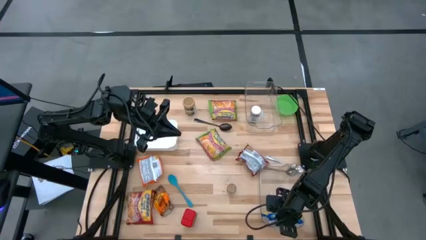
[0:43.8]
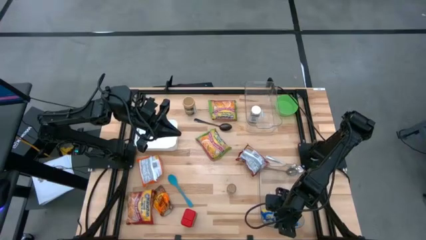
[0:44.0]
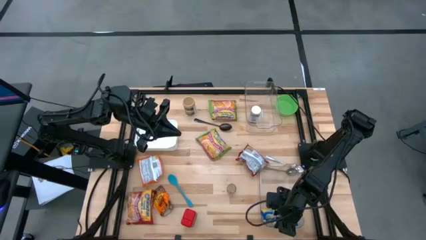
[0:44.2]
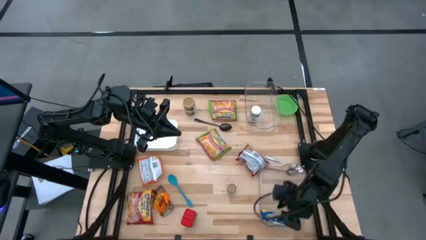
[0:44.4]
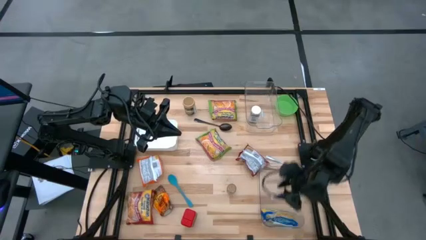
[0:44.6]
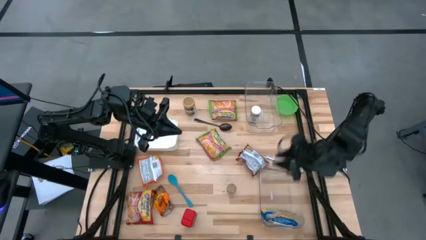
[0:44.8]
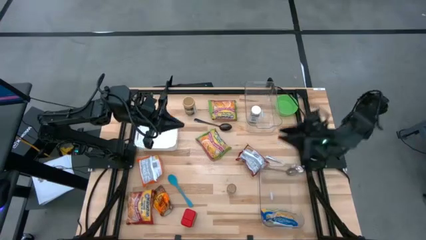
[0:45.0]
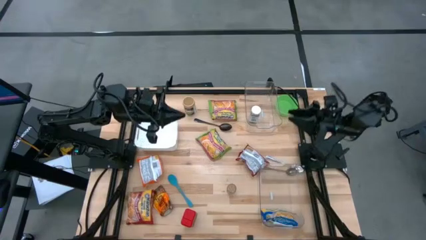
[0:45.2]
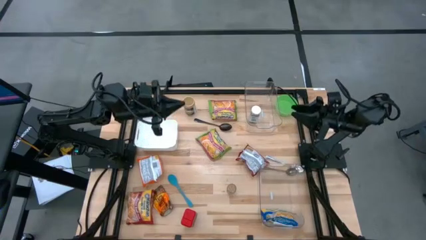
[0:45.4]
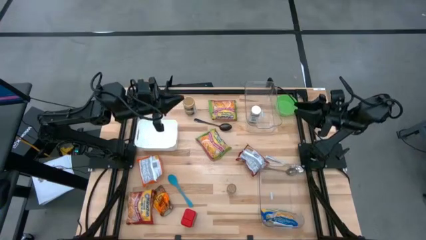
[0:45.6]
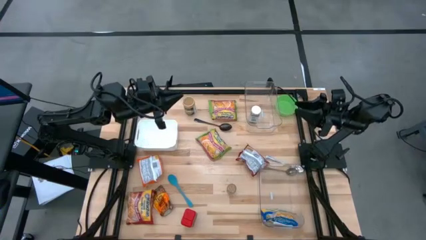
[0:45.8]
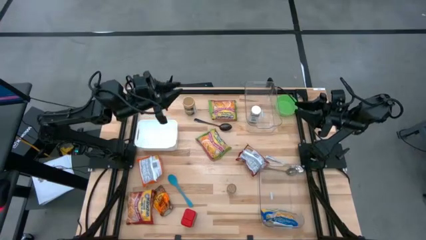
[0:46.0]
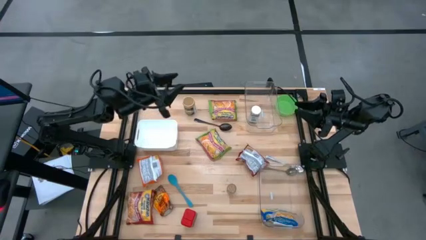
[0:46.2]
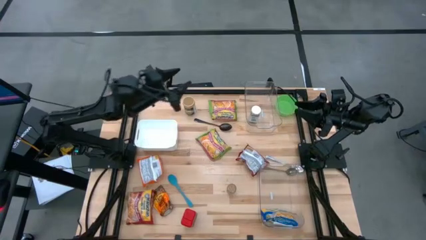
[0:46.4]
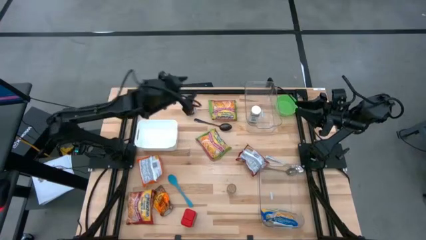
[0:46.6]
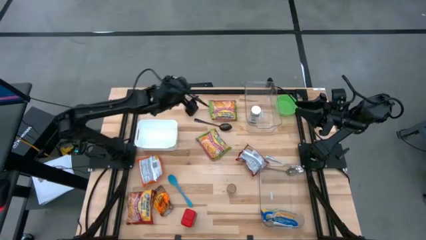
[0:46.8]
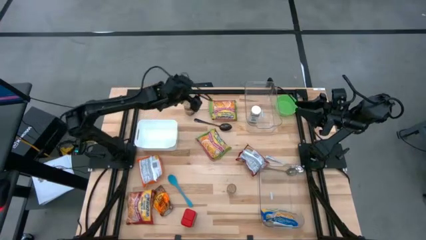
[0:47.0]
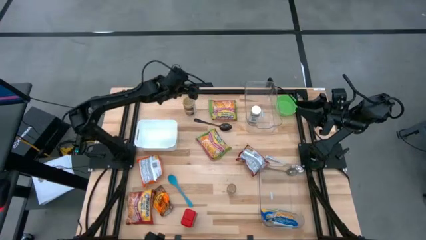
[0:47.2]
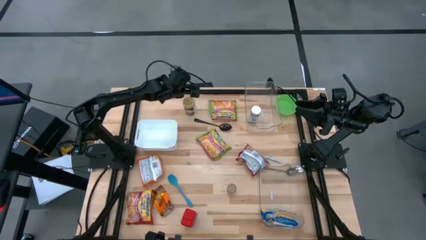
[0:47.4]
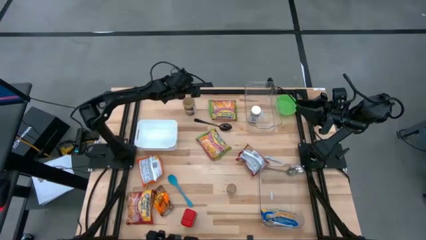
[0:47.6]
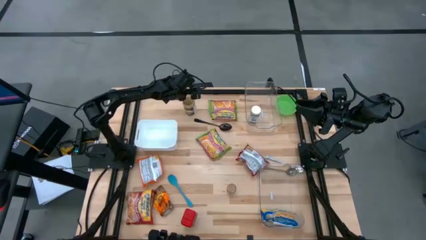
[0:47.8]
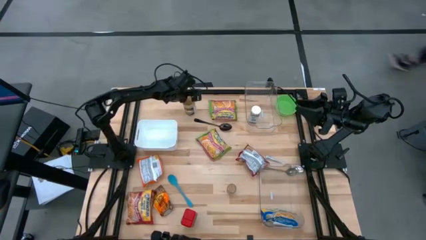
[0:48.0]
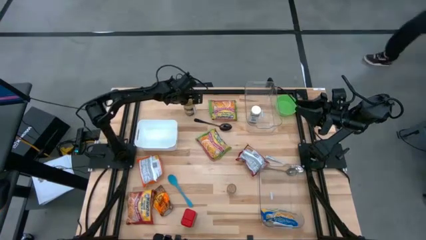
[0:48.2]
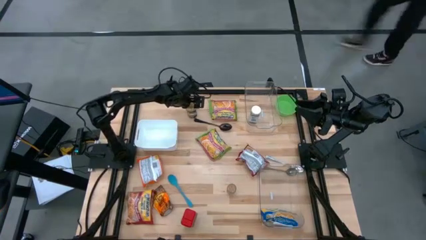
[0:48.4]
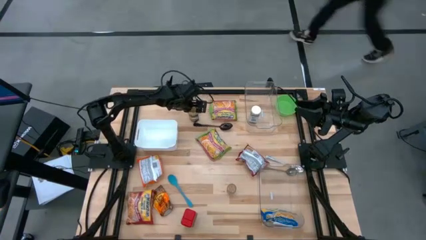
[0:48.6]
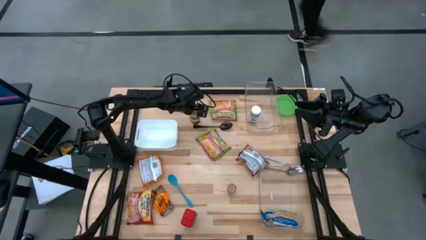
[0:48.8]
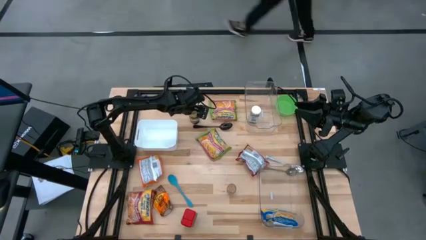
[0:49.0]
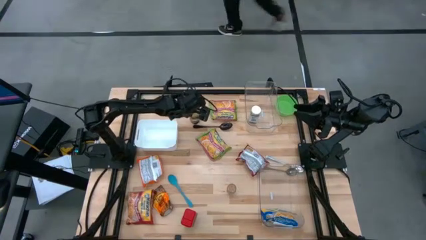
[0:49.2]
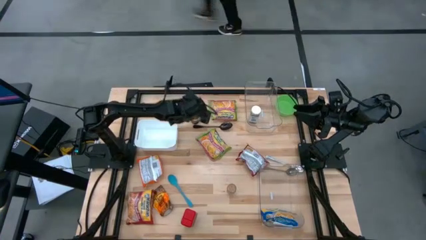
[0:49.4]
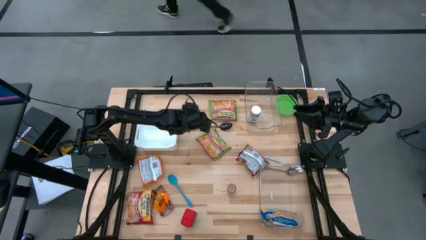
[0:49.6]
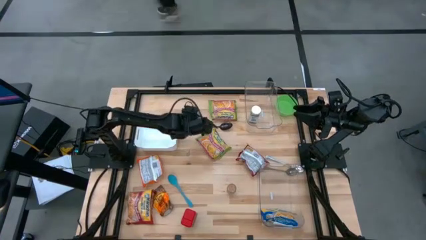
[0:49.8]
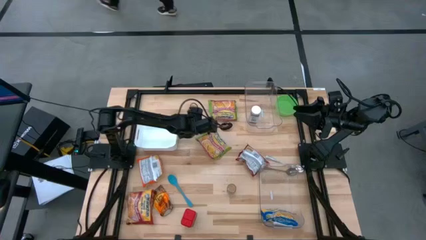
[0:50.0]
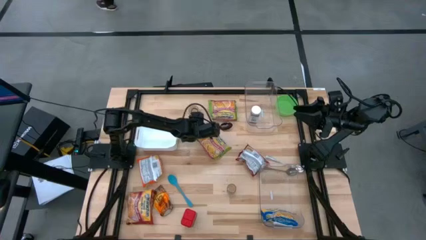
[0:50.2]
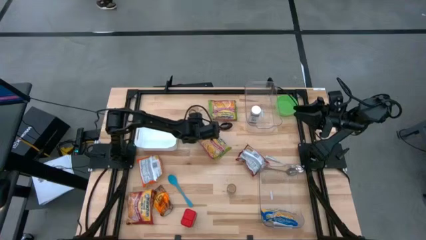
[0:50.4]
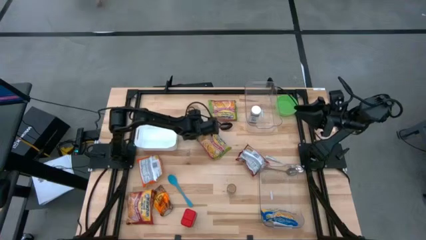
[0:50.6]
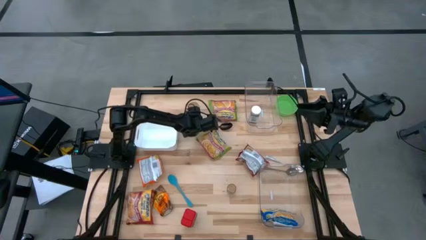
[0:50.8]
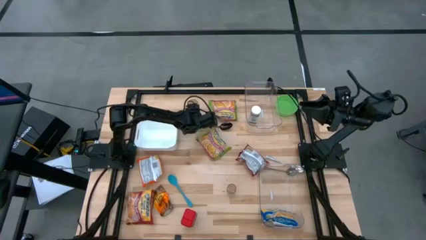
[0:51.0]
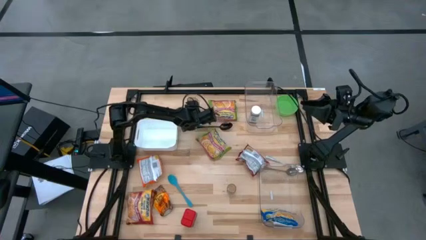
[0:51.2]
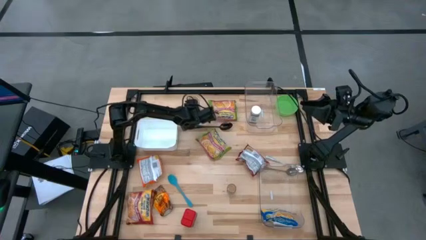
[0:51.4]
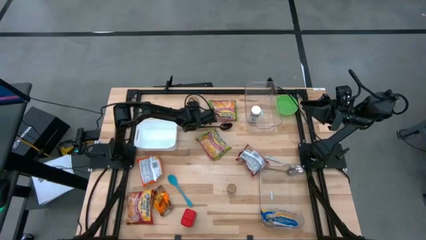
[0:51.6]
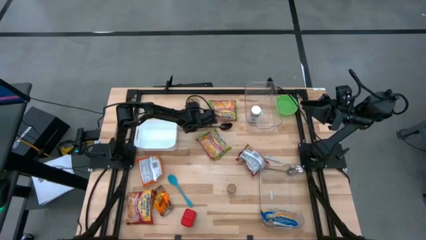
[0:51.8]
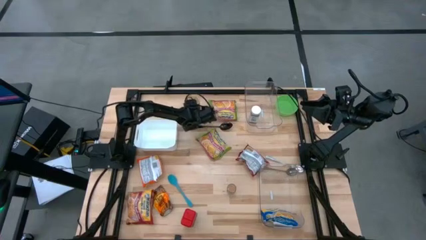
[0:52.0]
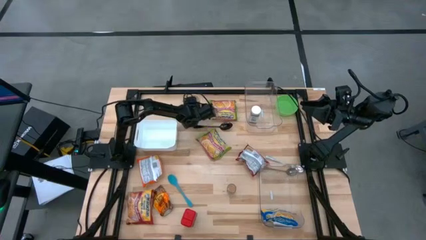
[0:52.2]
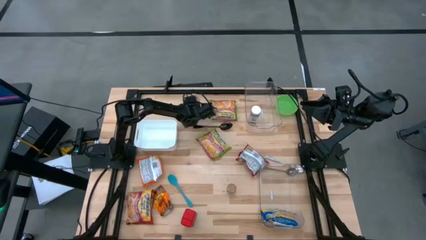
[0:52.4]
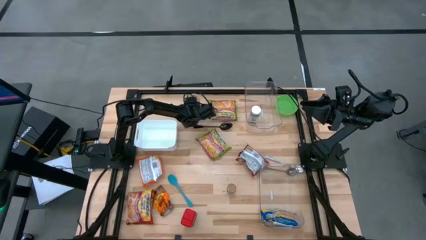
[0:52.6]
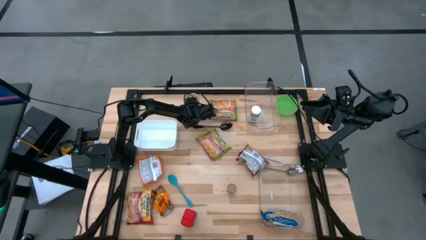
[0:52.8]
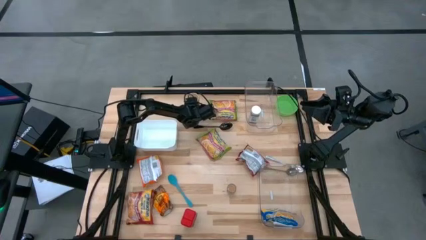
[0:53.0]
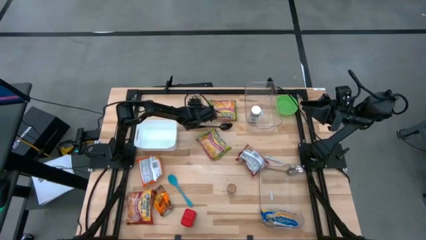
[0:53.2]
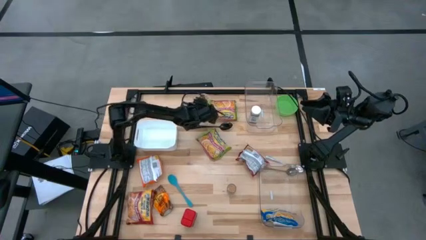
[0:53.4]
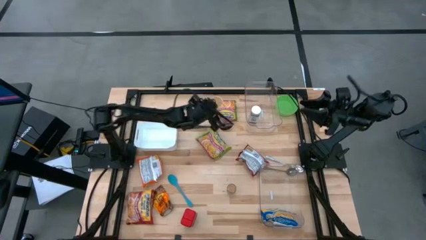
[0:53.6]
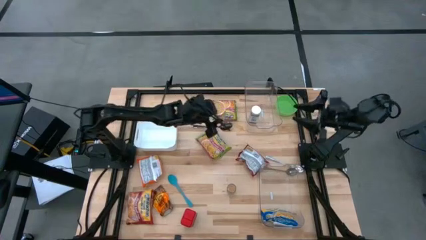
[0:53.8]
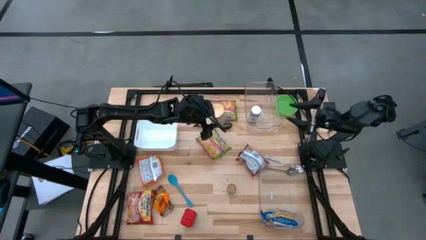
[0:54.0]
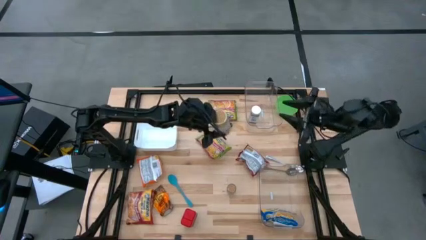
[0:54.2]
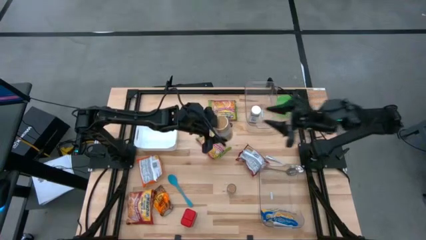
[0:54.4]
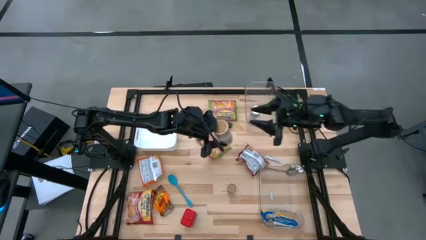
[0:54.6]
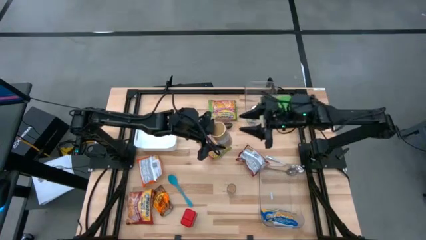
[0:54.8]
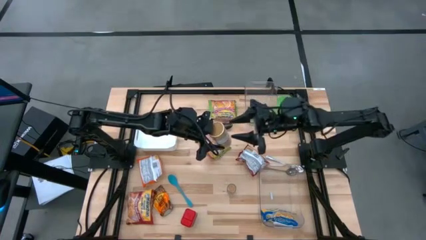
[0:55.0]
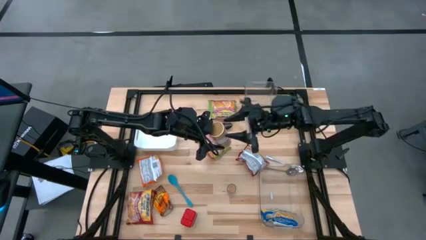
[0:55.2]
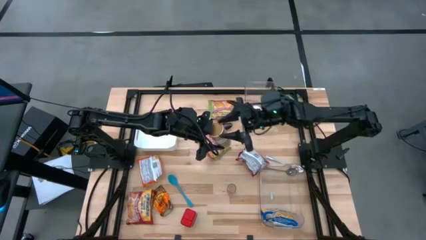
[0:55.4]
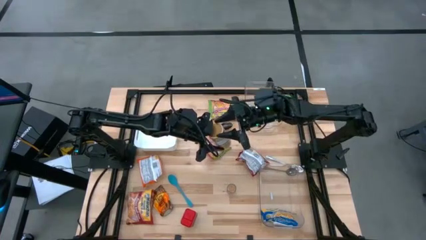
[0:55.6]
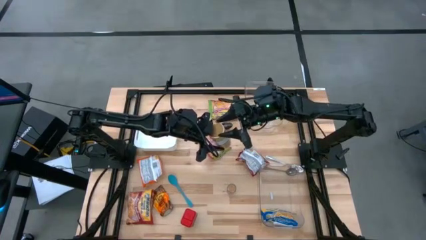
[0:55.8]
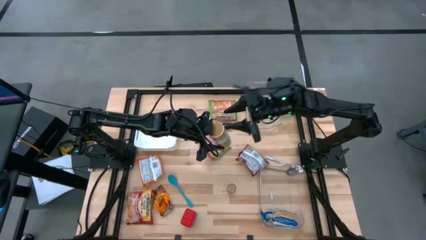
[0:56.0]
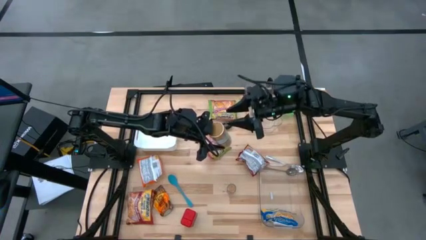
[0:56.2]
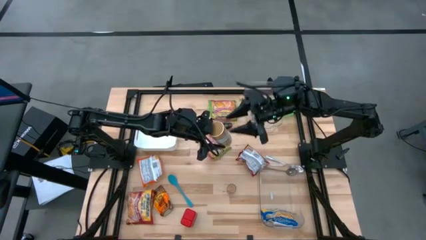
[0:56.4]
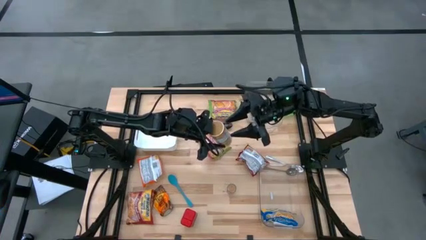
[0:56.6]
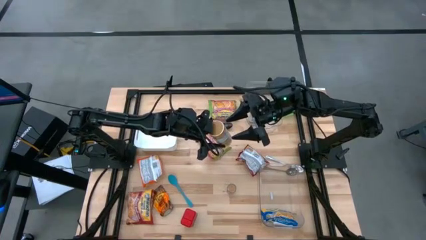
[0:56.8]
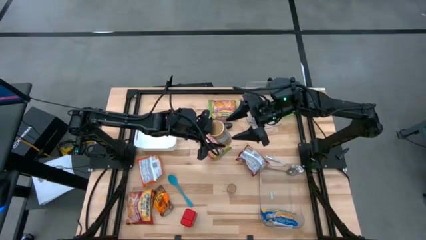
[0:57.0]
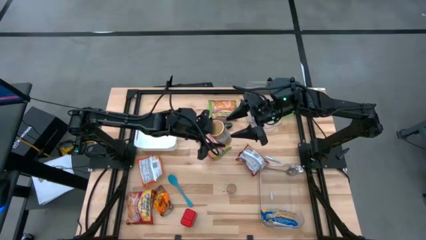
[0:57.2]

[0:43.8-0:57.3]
Task: Pick & Place Food Item
Put the gold seasoning bottle into the top transparent bin
